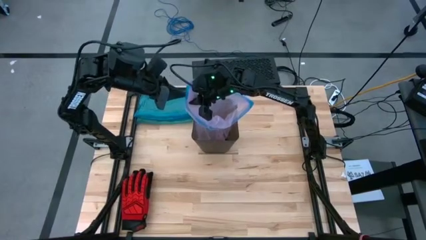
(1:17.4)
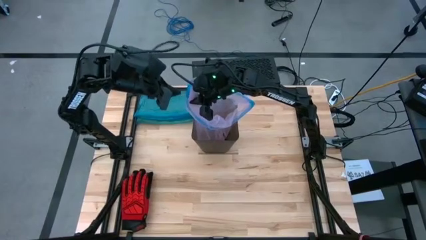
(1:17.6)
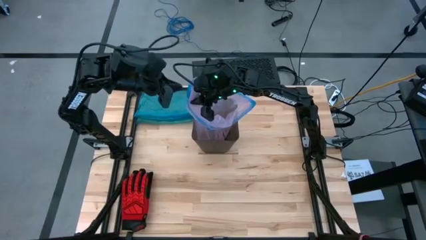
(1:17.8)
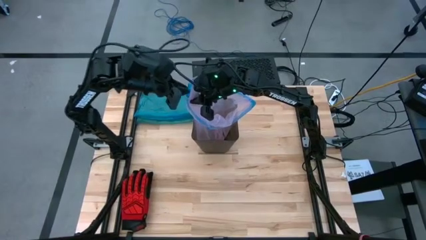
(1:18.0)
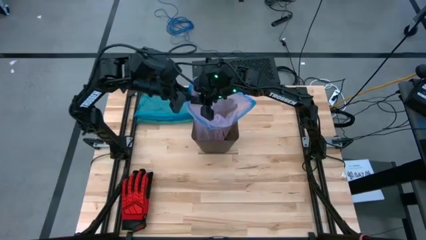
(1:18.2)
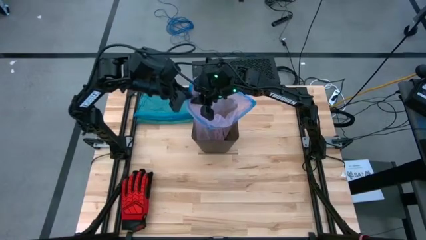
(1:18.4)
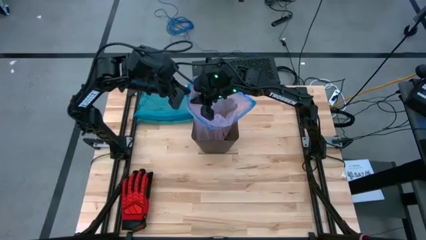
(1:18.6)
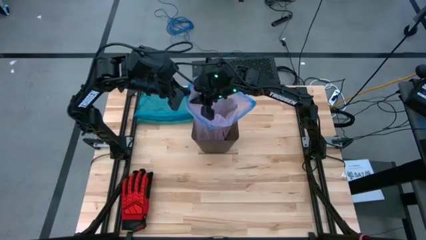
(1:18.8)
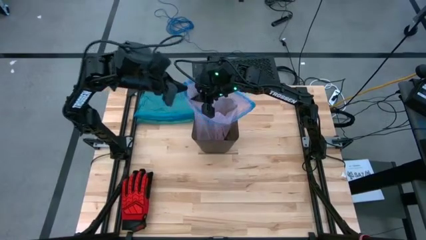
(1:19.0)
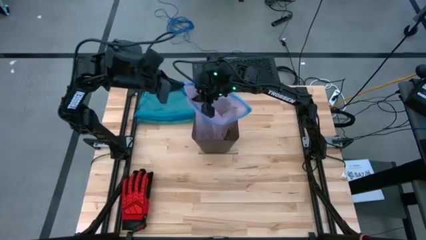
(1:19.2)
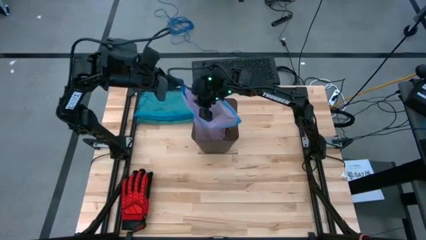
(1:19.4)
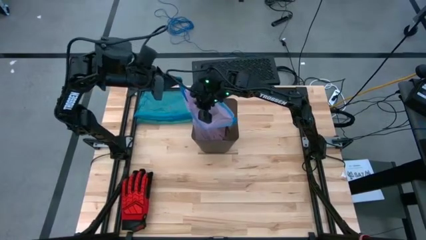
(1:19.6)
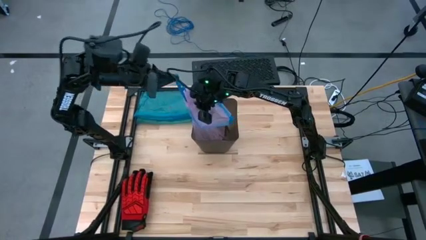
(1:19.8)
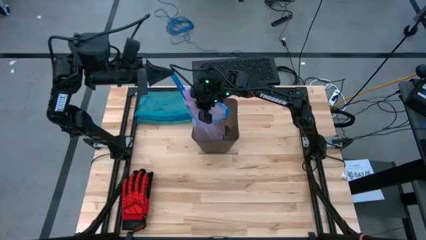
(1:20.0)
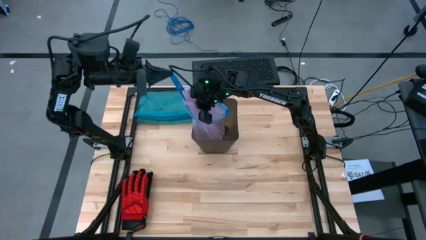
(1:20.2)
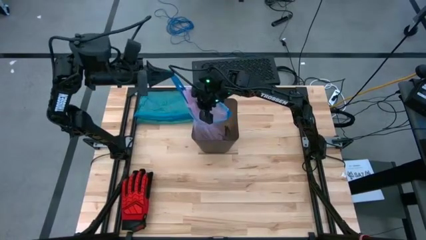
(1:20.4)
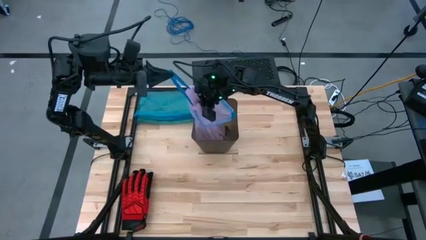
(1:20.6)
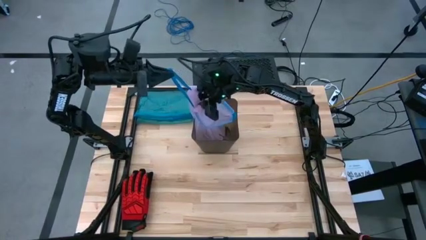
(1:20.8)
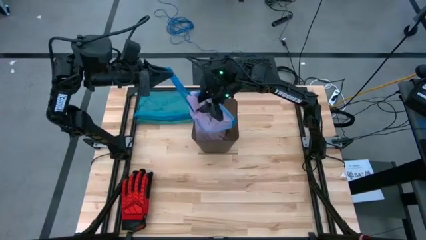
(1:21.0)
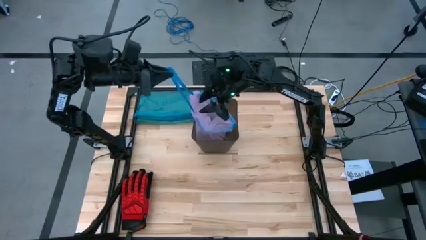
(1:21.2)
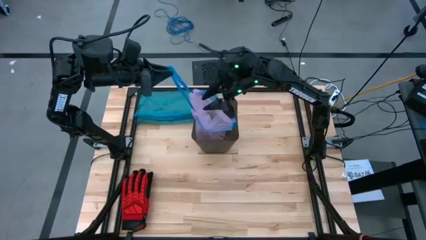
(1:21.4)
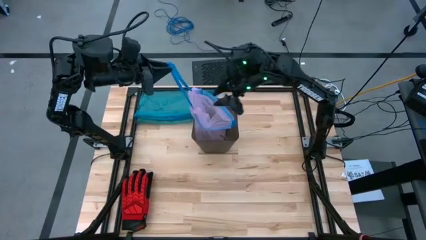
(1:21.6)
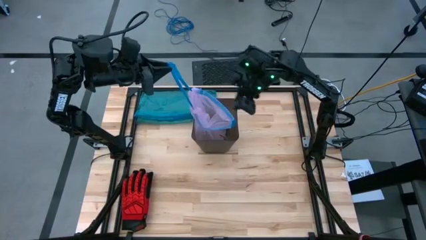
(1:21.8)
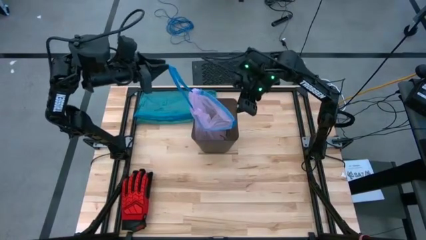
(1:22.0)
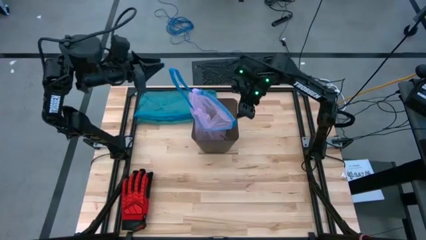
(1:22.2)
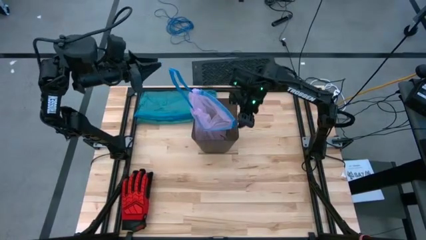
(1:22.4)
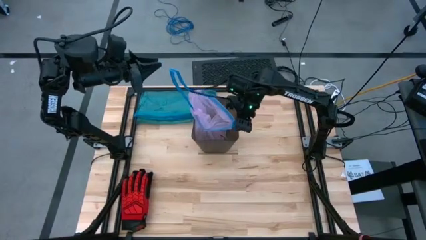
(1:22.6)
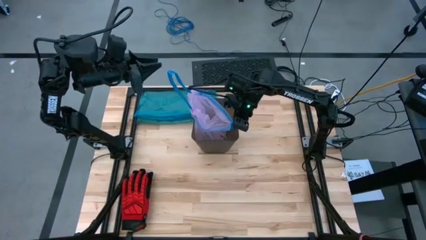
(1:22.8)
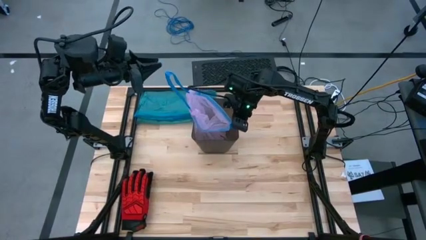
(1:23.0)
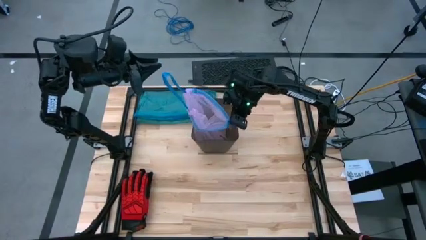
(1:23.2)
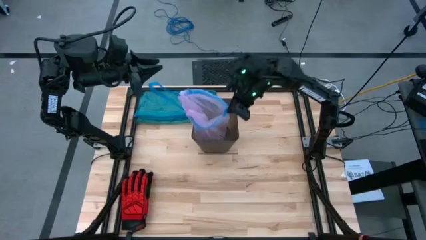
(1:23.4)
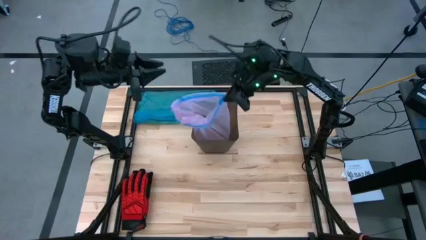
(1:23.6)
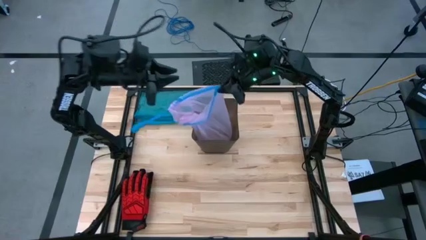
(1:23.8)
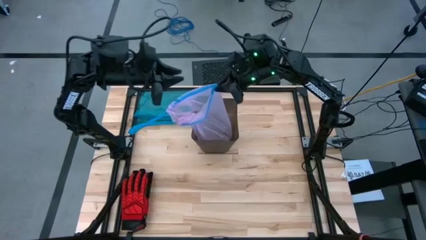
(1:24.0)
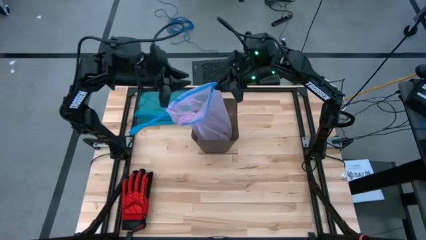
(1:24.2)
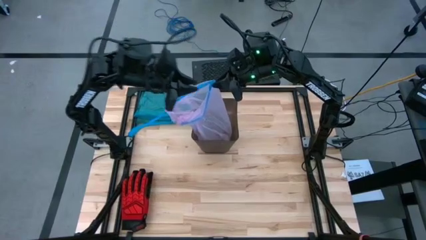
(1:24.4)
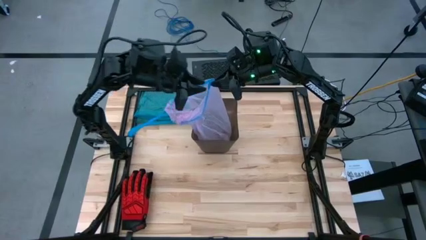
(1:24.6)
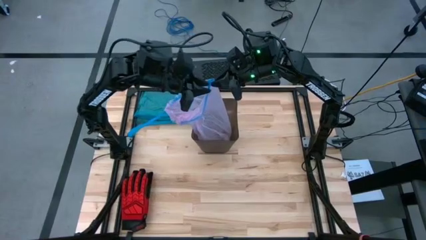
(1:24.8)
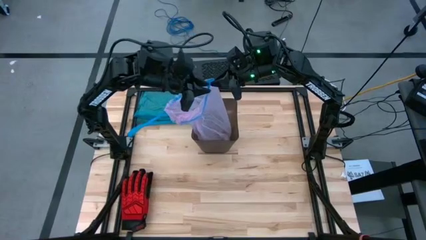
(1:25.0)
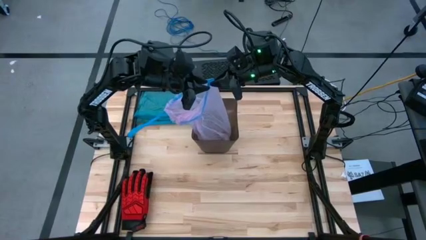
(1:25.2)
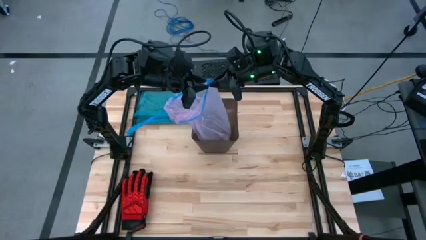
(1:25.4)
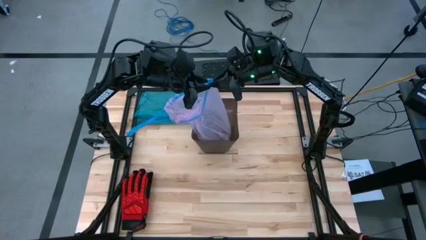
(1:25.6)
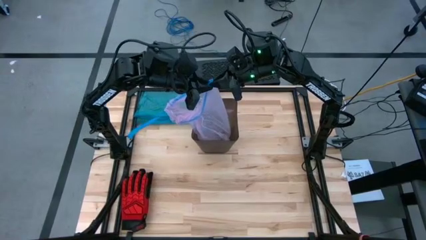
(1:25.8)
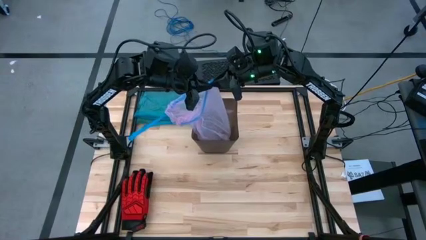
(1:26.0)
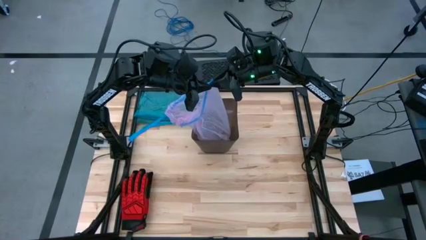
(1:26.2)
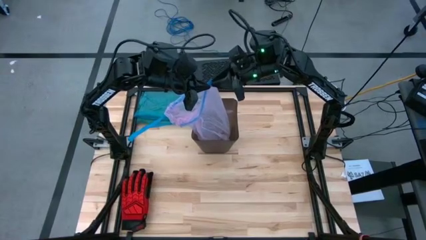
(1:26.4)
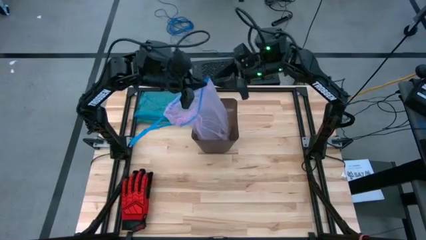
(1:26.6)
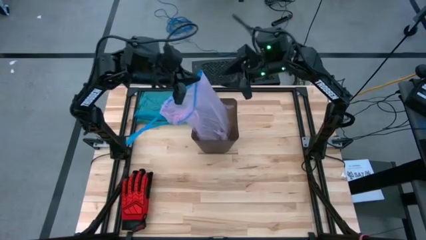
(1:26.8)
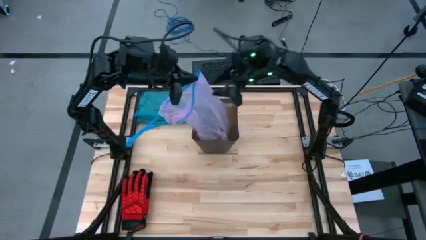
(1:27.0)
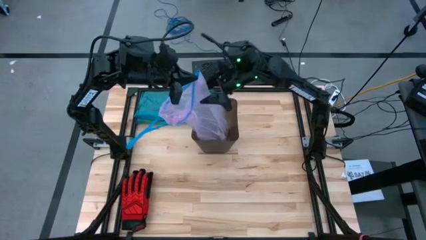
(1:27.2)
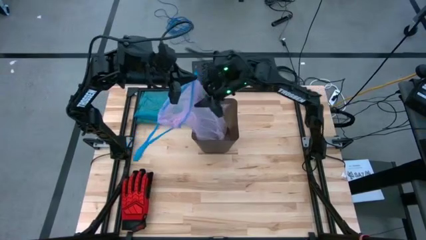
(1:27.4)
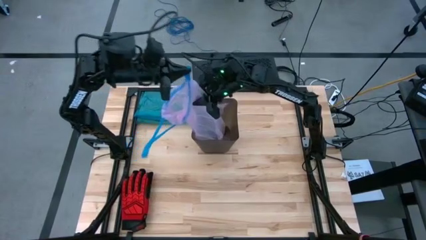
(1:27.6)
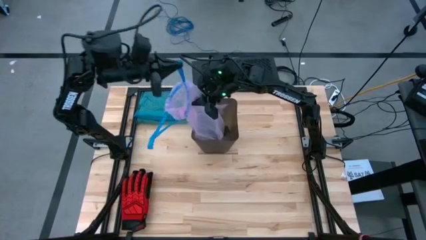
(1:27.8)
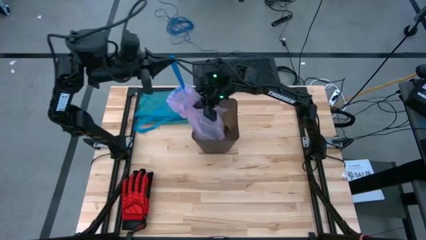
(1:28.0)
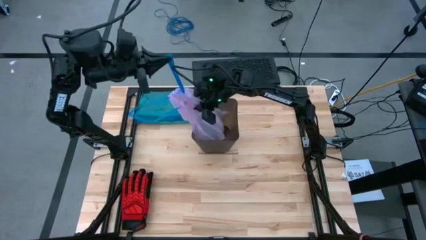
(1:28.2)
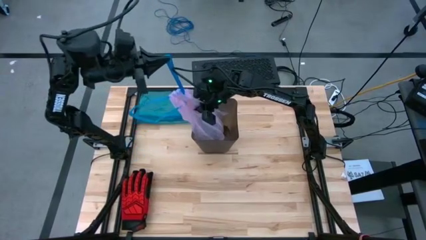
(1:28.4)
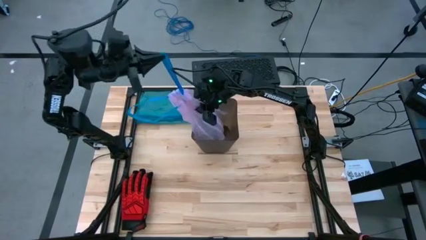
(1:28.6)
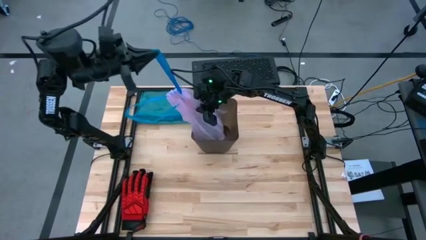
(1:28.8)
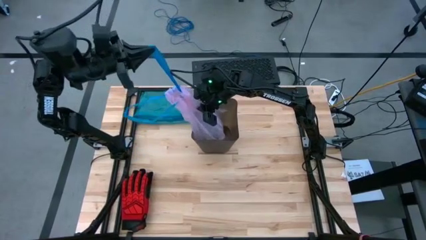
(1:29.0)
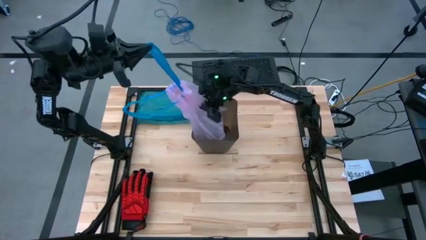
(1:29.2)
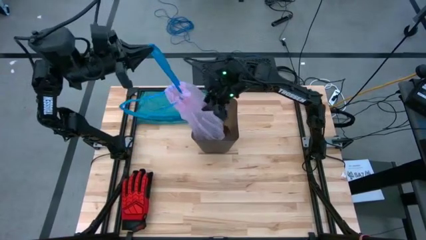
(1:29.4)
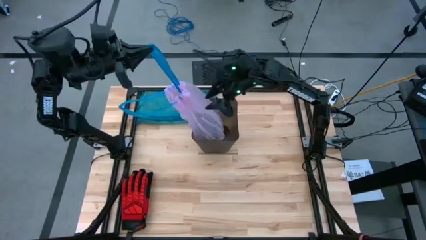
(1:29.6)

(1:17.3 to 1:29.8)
Task: place trash/remove bag and relplace
Close the pink trash bag
